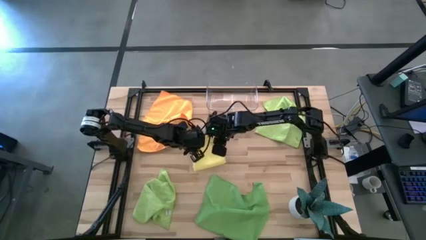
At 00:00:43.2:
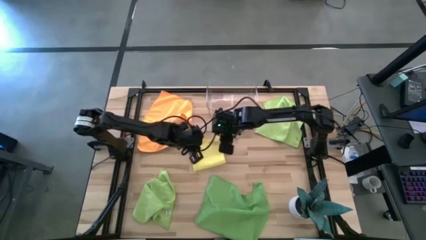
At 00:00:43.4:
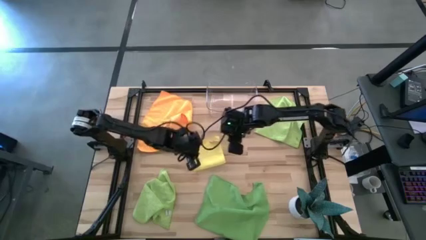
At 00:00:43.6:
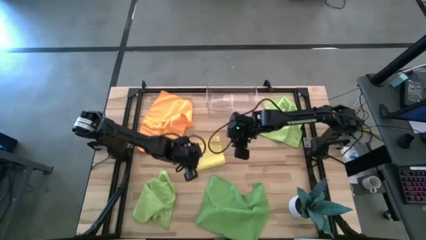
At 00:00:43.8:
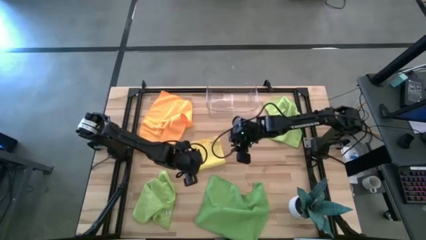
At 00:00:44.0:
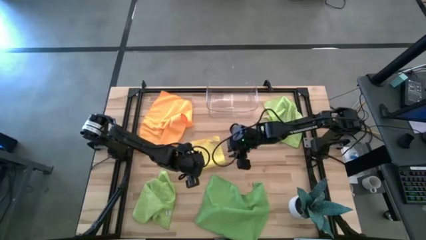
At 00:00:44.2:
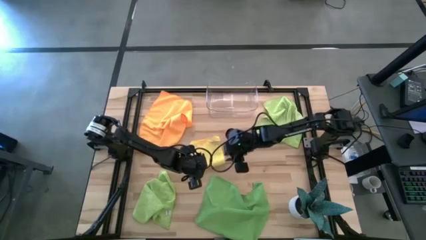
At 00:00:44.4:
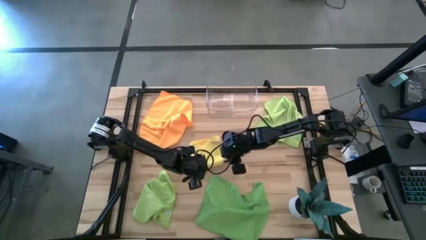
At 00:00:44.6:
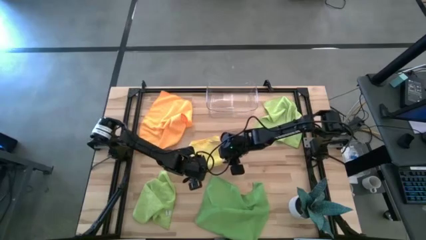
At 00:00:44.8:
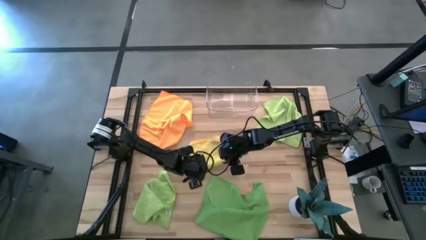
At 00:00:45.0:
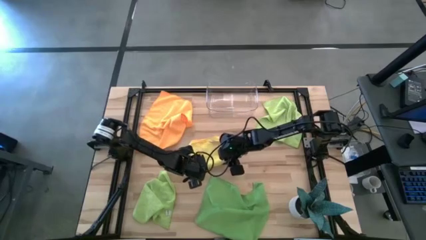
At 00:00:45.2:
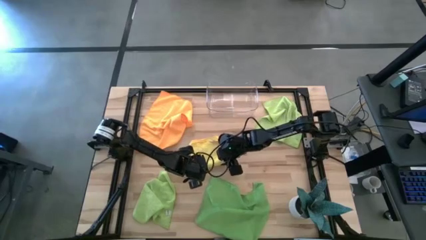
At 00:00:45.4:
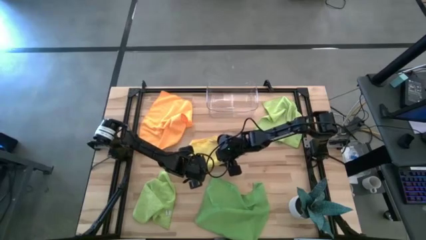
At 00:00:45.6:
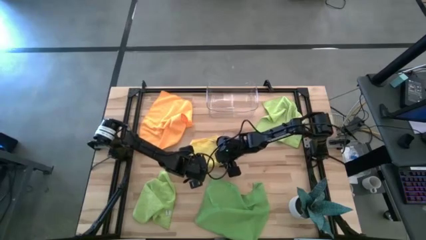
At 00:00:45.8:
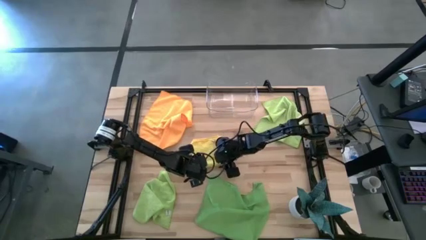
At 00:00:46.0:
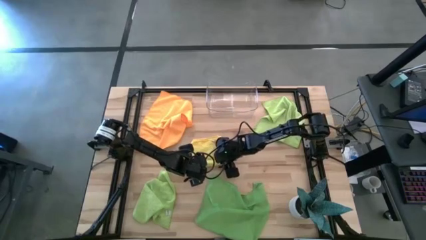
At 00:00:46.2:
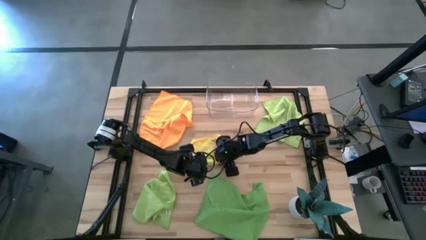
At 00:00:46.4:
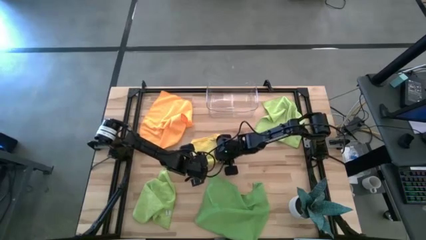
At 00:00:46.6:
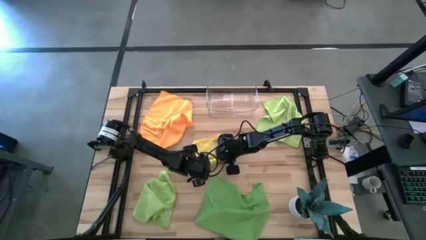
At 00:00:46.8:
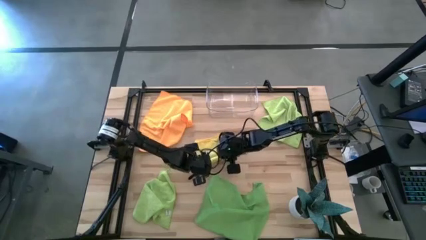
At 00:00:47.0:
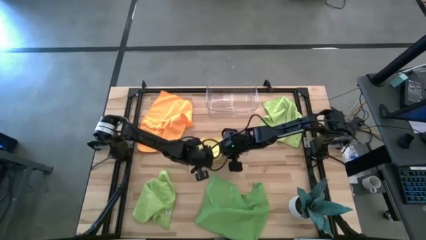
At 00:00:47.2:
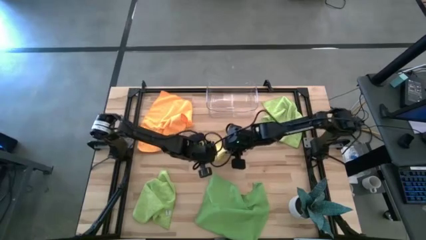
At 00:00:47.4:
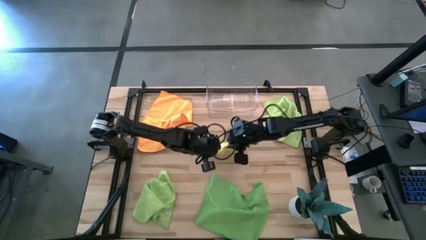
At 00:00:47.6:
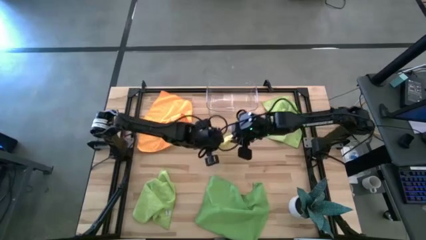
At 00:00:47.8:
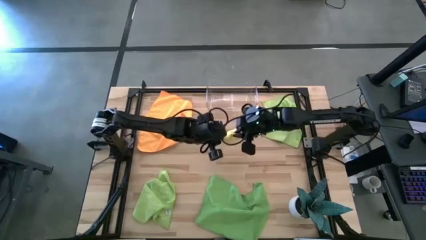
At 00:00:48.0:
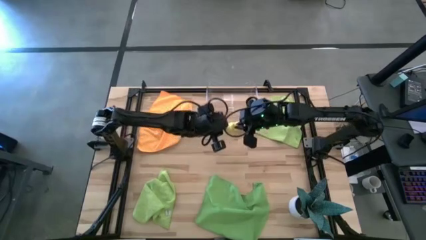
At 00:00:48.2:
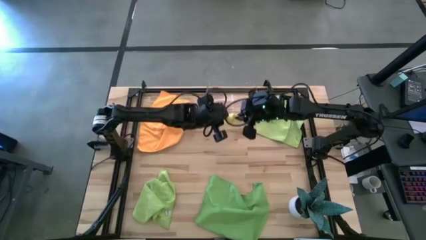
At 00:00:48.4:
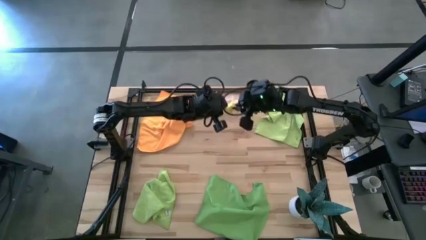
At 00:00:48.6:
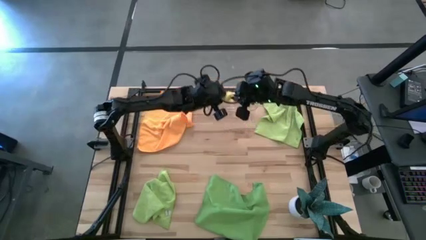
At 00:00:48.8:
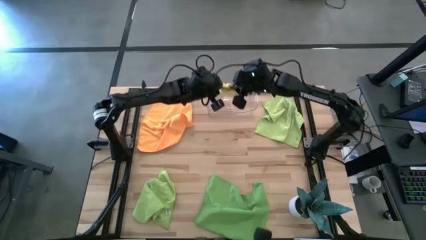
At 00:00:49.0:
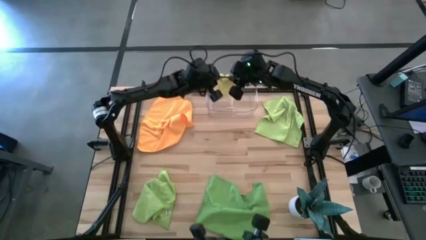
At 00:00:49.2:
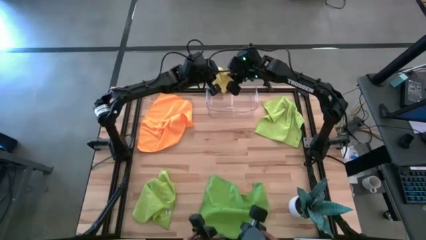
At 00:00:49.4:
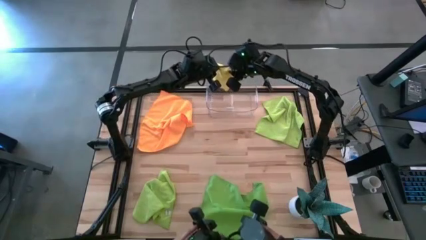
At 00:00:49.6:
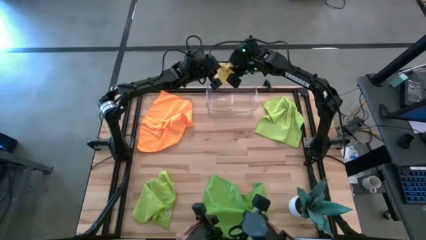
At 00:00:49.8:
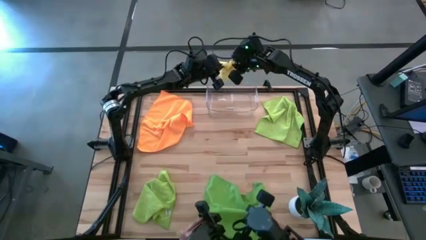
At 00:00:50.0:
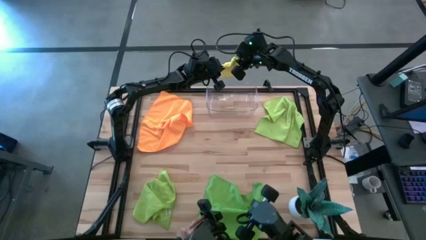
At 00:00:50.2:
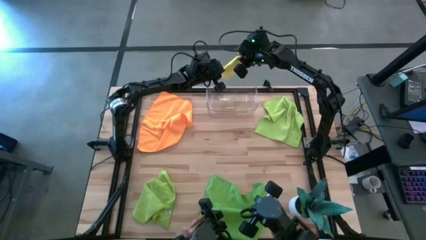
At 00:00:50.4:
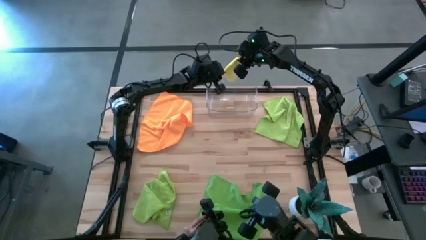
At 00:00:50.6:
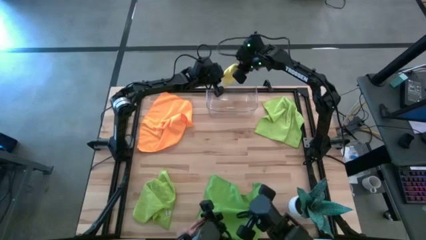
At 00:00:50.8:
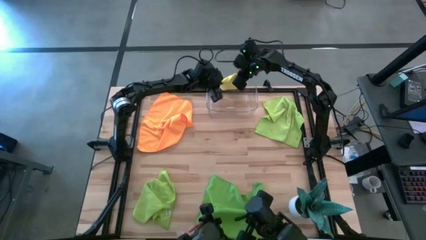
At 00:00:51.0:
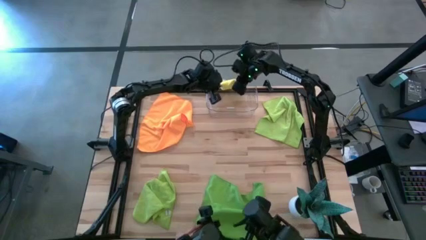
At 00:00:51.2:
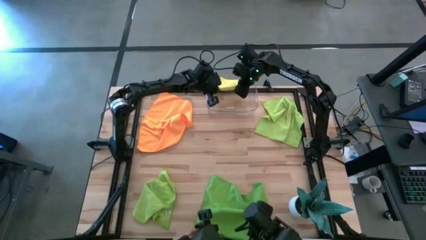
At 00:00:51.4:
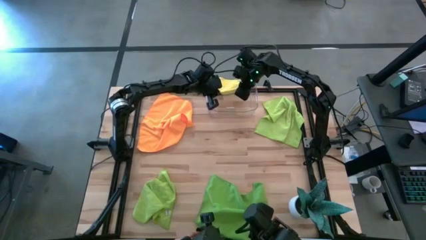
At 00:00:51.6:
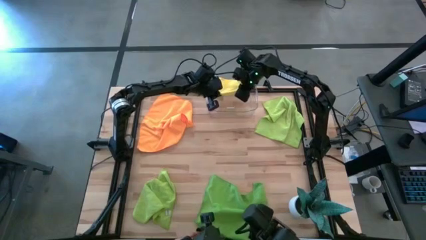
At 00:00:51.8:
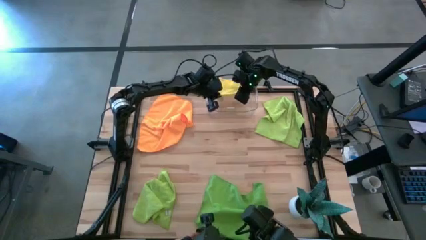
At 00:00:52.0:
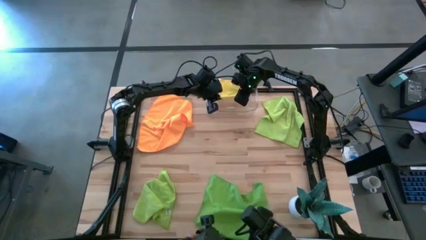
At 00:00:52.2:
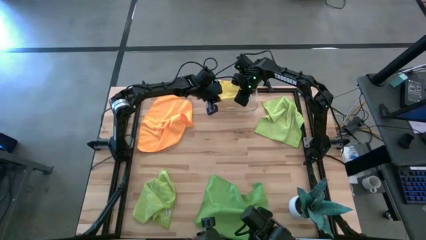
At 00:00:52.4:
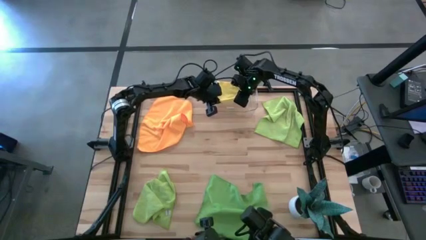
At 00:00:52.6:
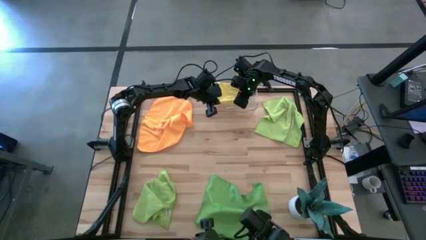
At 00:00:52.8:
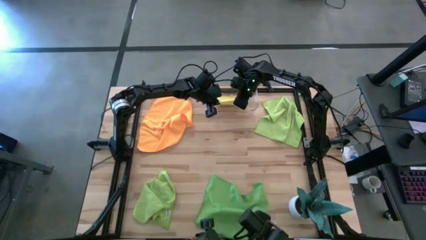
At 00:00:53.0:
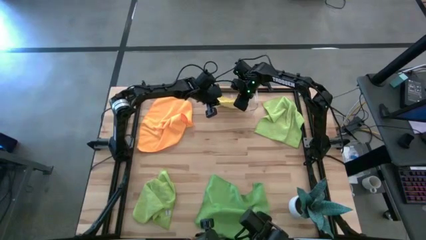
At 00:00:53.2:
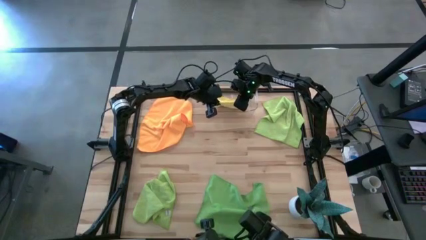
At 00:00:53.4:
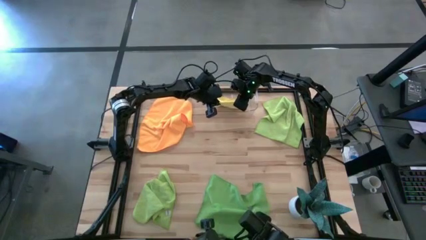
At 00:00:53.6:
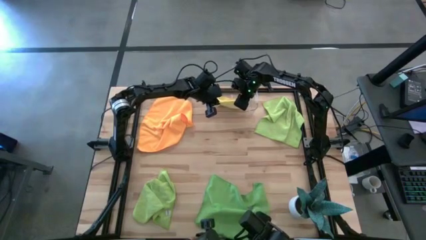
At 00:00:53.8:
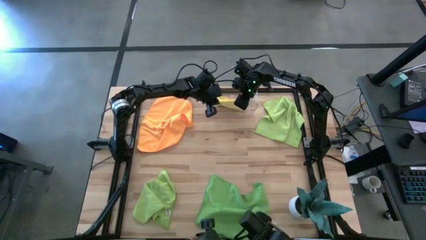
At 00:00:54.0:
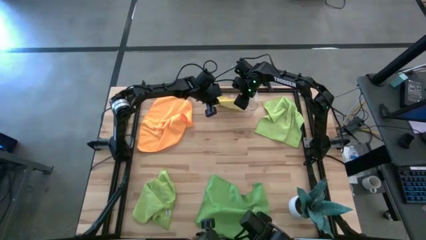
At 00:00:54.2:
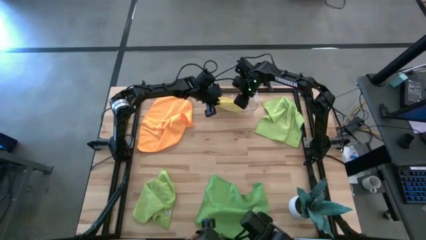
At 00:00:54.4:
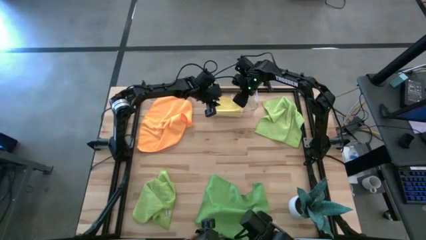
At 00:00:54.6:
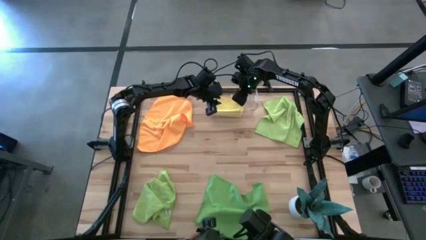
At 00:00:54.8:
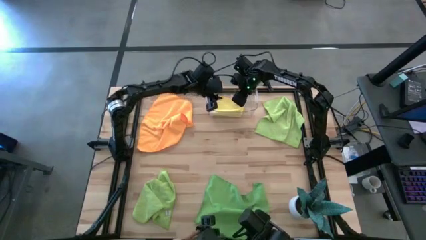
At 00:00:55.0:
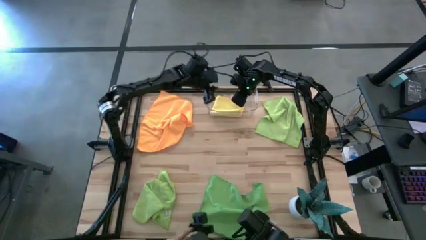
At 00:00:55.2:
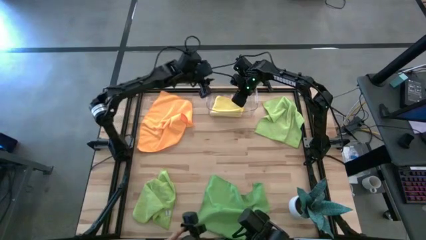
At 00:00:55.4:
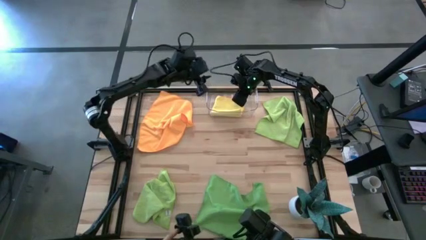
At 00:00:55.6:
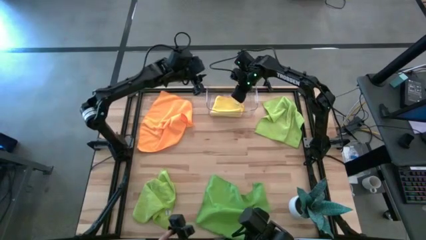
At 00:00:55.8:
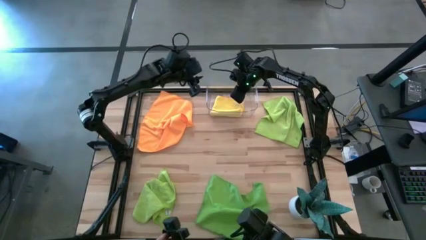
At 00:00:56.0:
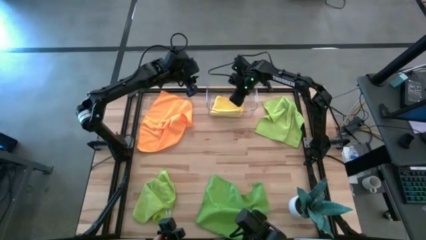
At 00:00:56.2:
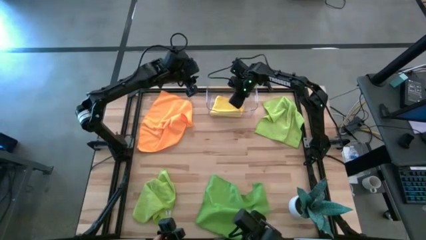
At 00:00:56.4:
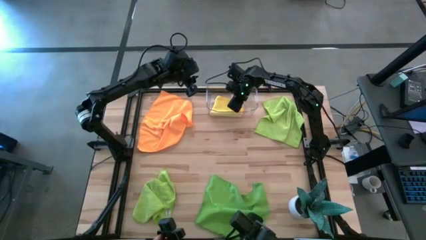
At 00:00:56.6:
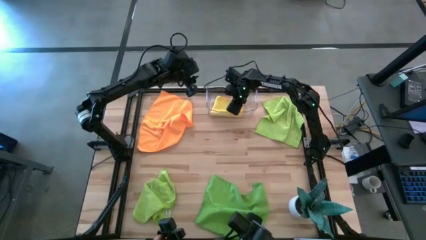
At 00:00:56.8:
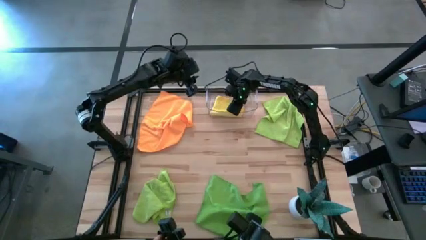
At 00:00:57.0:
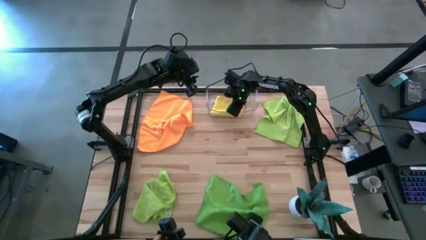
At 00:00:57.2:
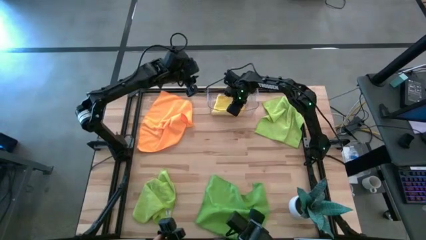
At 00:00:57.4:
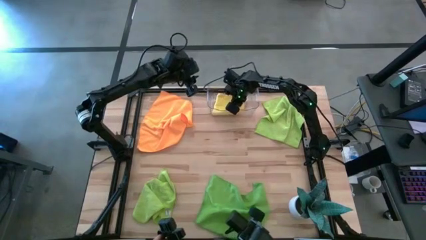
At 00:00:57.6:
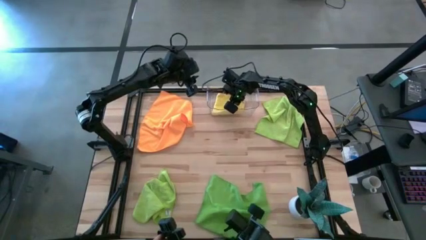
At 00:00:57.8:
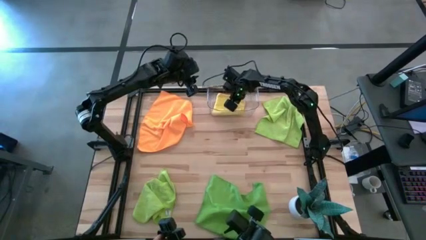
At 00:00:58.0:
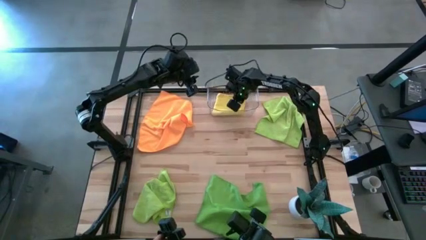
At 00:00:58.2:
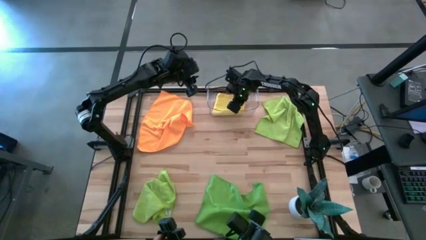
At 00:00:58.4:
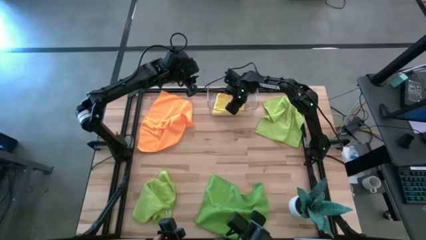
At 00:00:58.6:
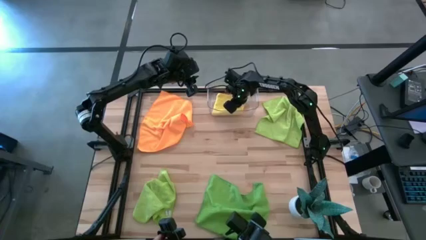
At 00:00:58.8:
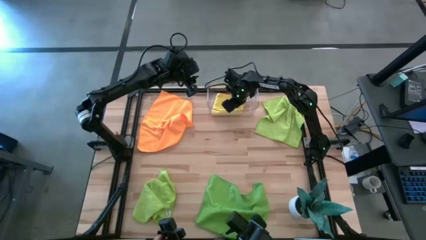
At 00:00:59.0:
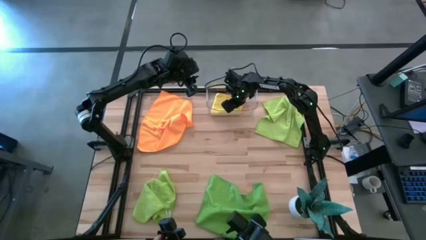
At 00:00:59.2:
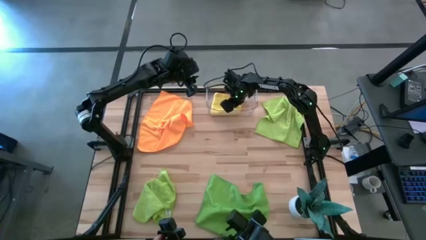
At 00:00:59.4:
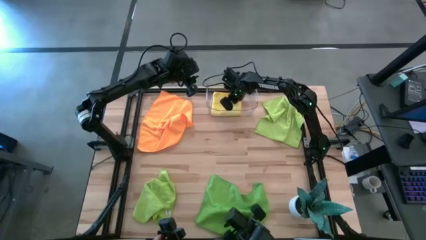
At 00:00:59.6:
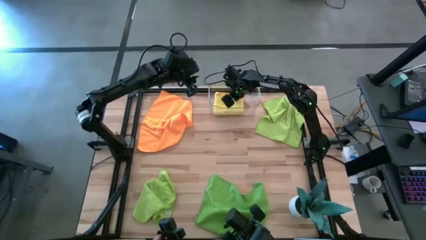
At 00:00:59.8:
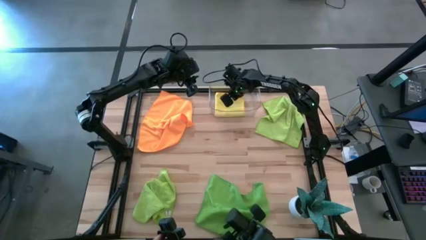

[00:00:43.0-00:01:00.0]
Task: Fold microfiber towels
Put the yellow microfiber cloth into the transparent bin
